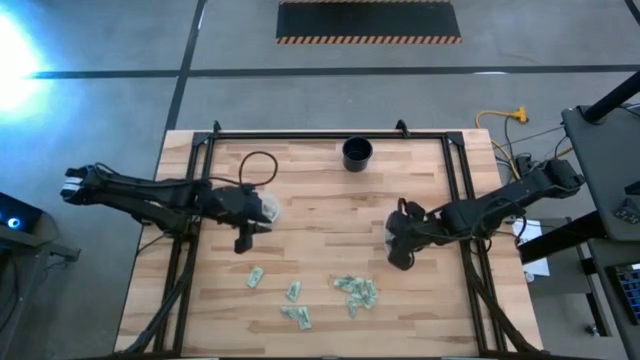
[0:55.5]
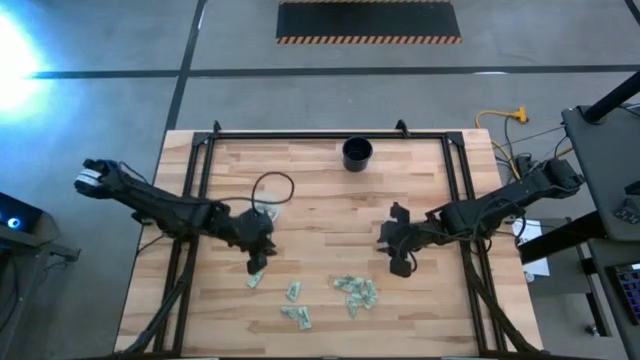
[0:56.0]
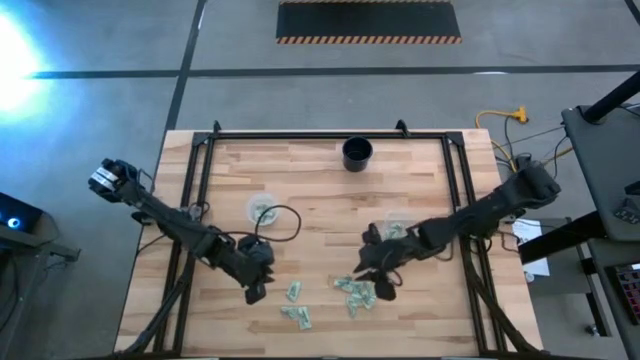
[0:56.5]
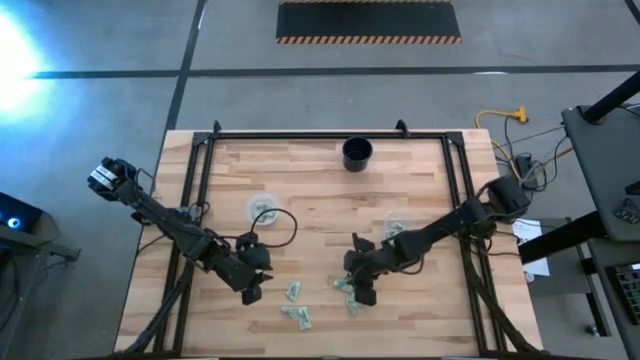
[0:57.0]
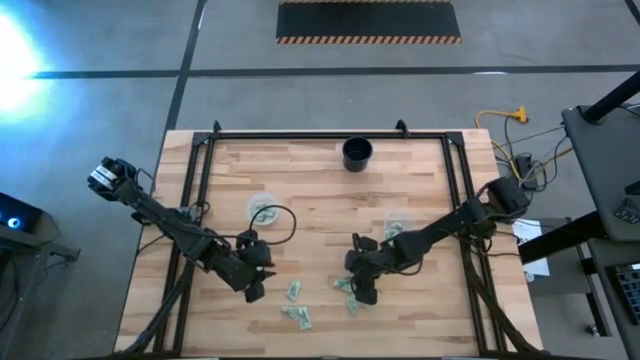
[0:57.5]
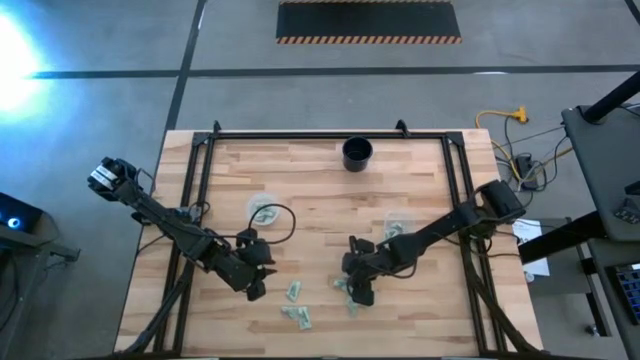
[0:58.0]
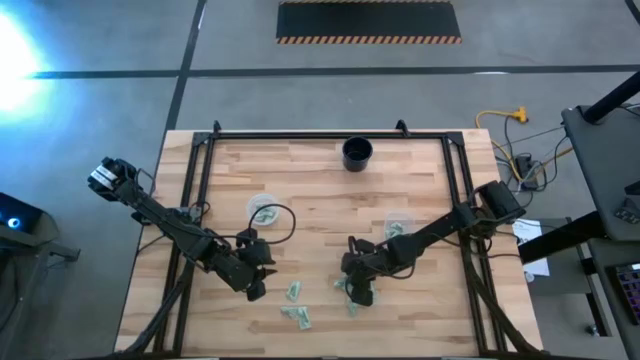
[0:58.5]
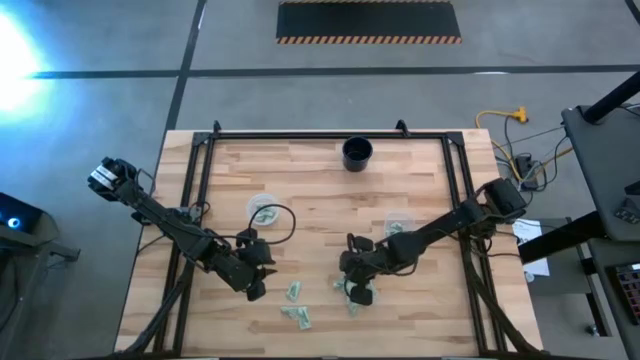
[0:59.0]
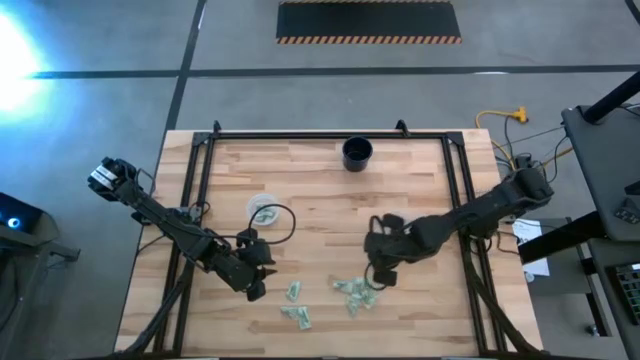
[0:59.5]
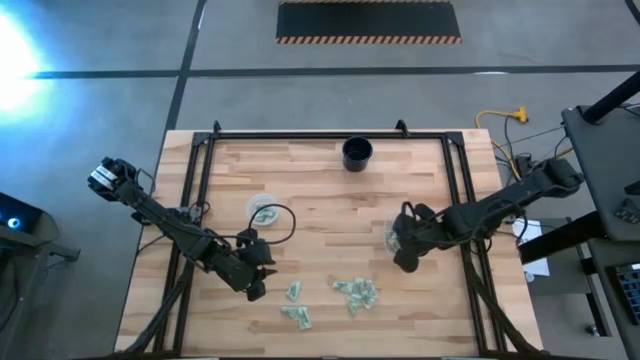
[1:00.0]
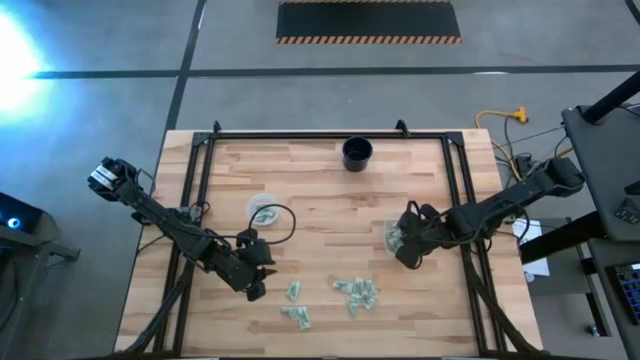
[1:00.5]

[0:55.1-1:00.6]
Task: Pick and place items into bin
Put the white sweetener packet into the right transparent bin

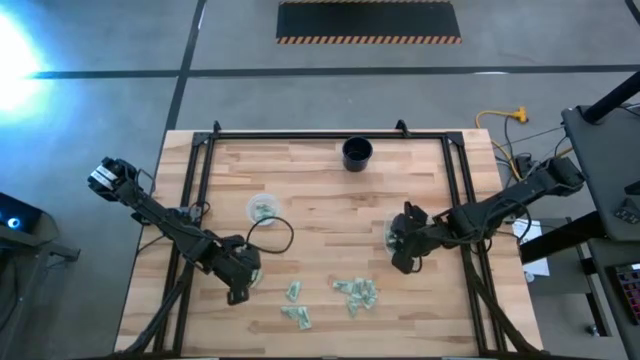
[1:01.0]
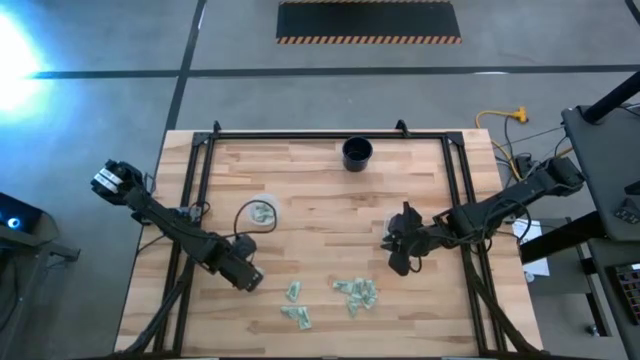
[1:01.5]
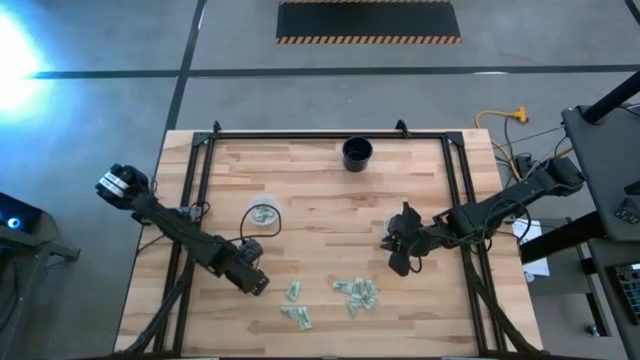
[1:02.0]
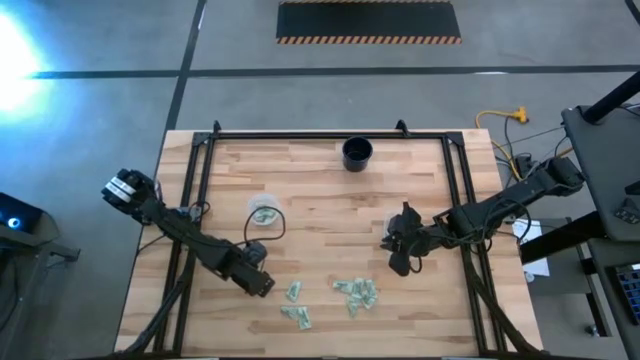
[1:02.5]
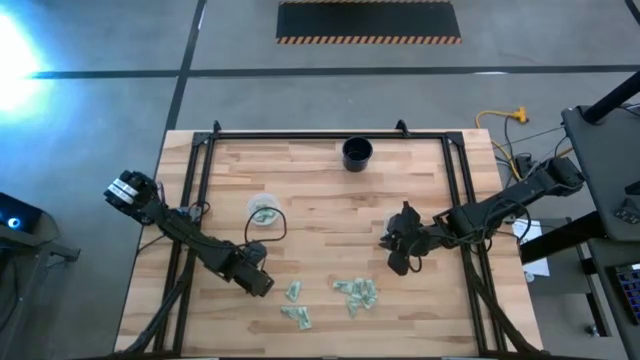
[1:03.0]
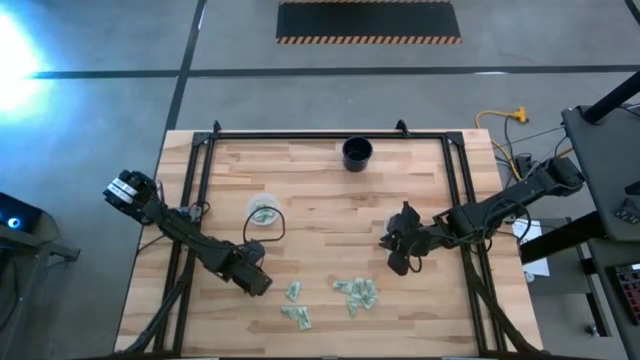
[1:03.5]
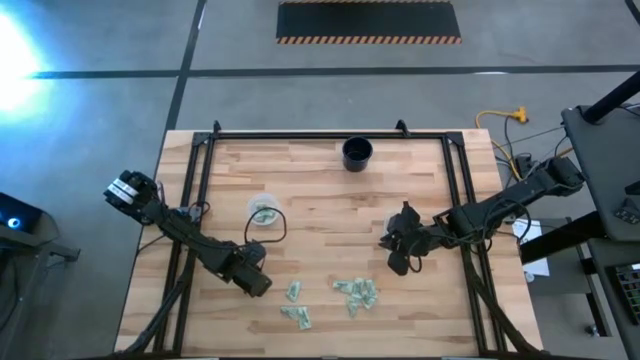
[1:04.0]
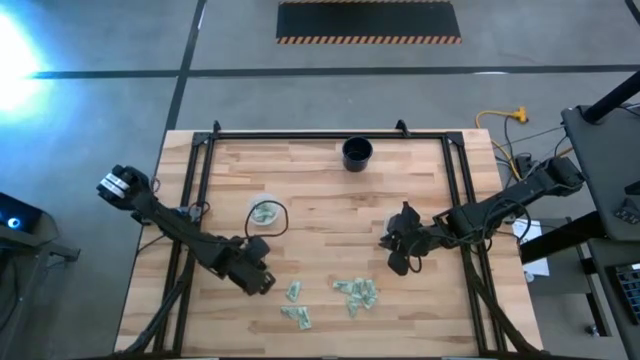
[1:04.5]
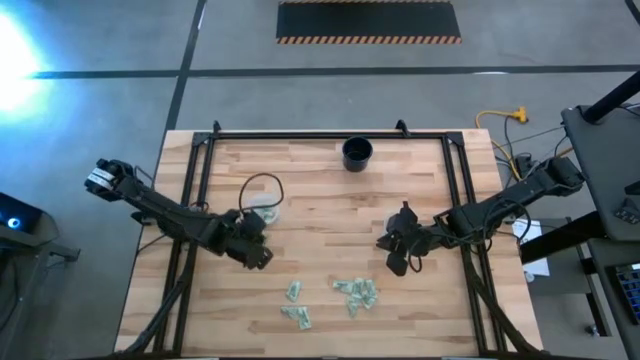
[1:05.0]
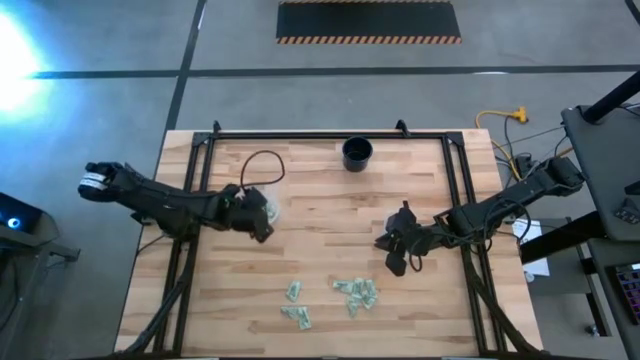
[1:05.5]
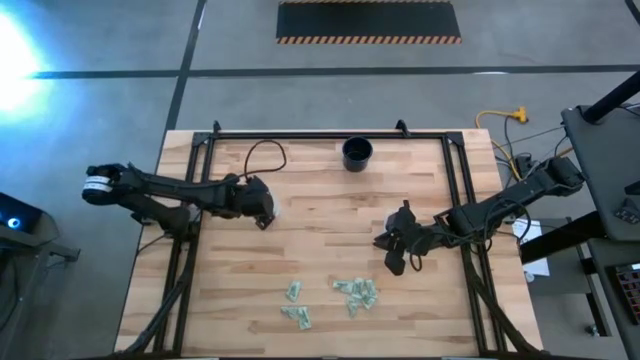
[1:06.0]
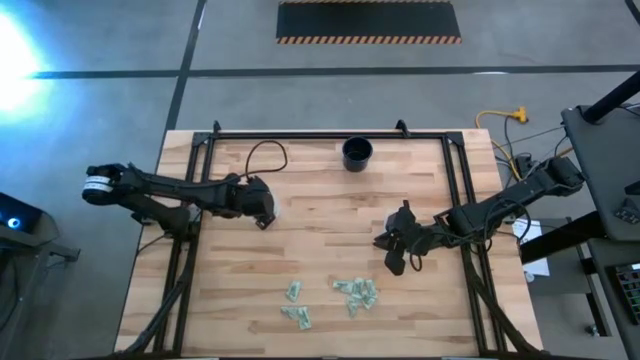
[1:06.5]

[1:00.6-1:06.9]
Put the white sweetener packet into the left transparent bin

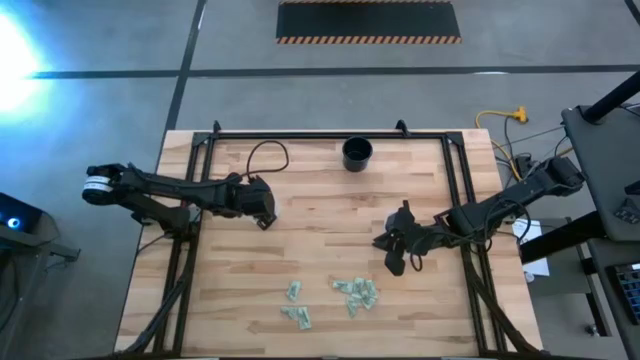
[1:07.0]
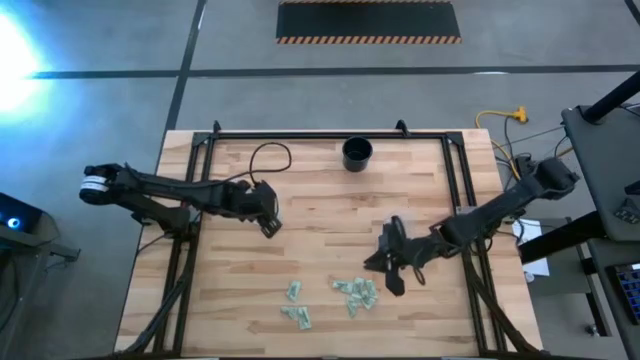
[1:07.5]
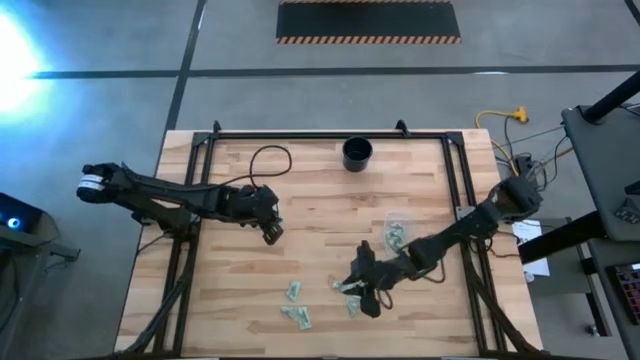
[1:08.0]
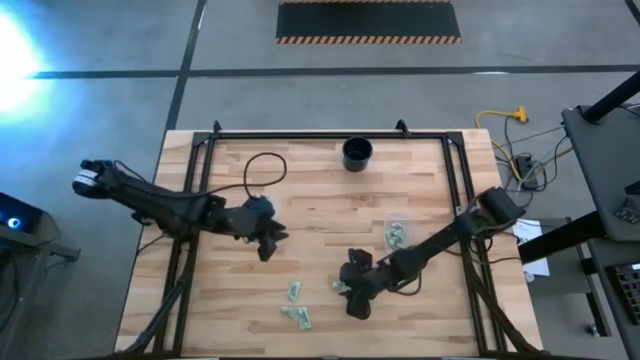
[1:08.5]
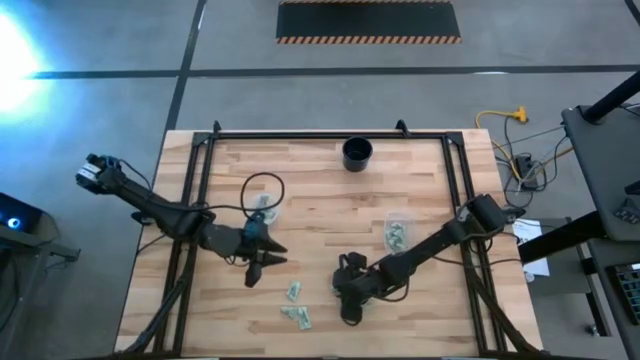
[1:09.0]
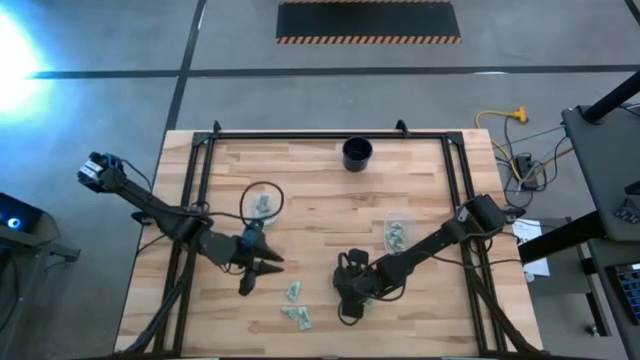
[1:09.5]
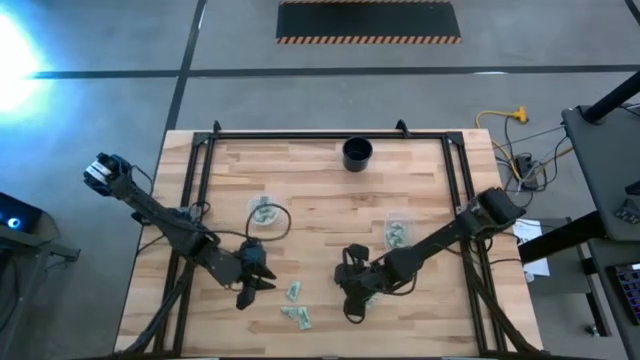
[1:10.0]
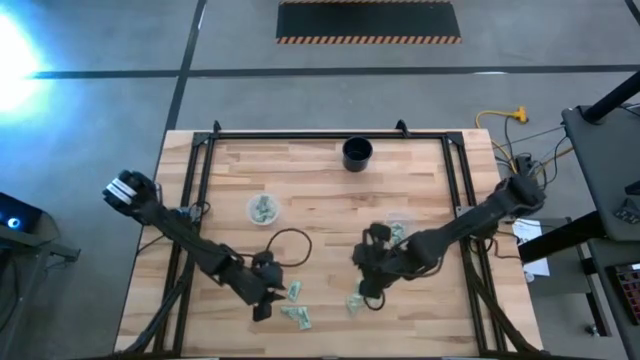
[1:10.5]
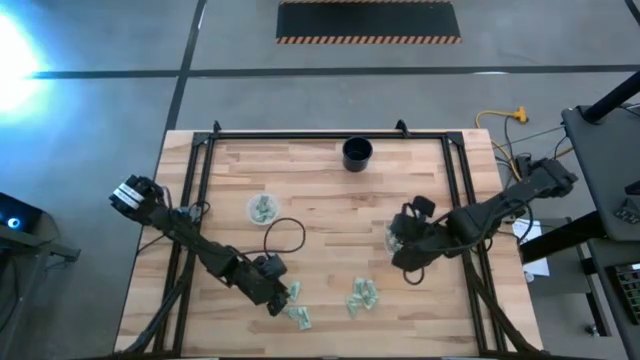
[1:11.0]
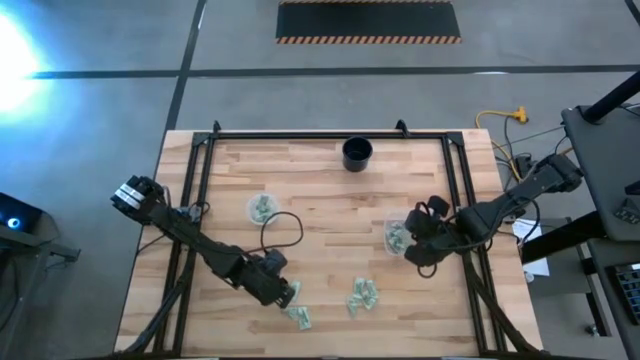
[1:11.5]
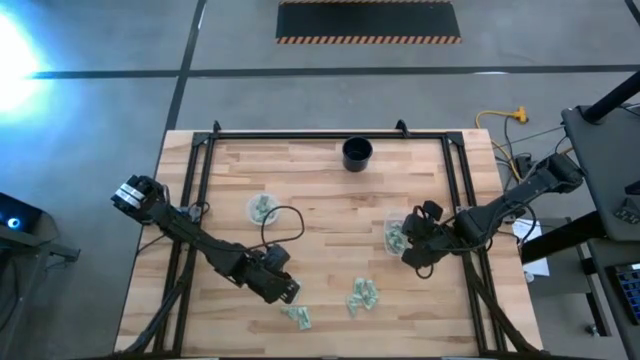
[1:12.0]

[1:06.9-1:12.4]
Put the white sweetener packet into the right transparent bin

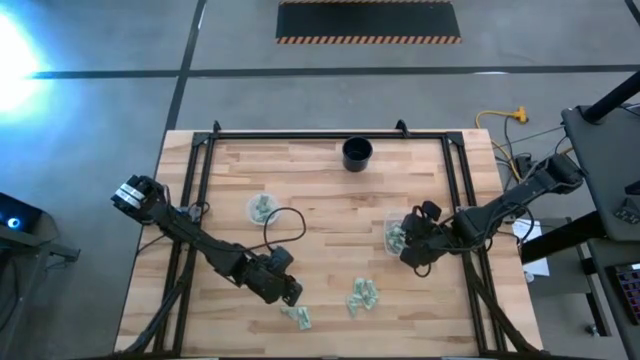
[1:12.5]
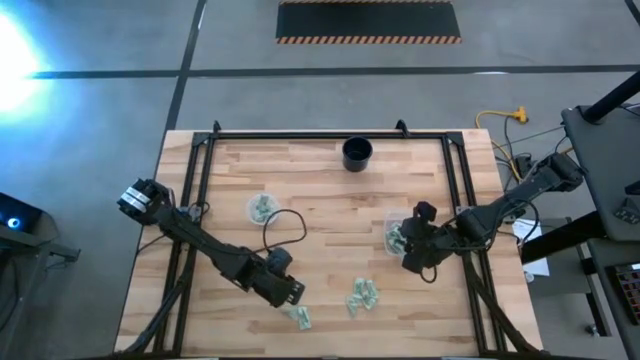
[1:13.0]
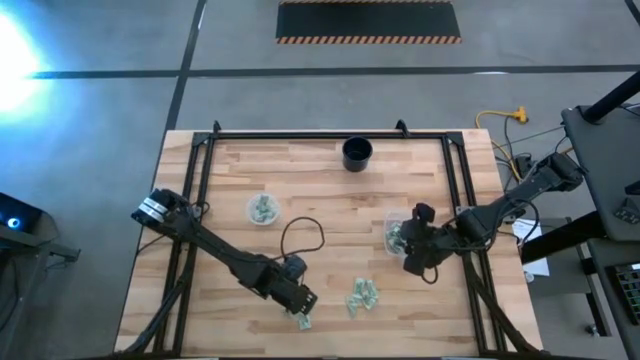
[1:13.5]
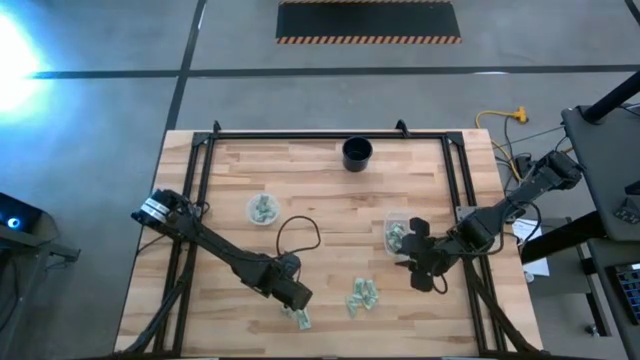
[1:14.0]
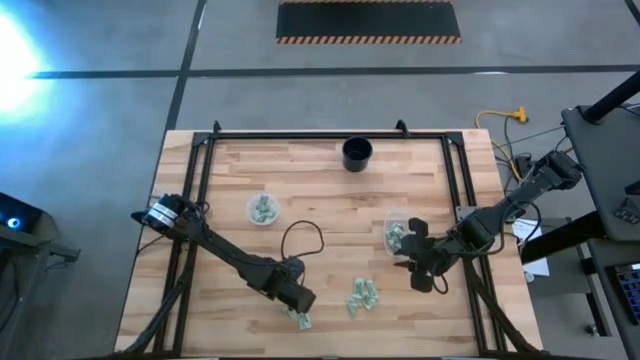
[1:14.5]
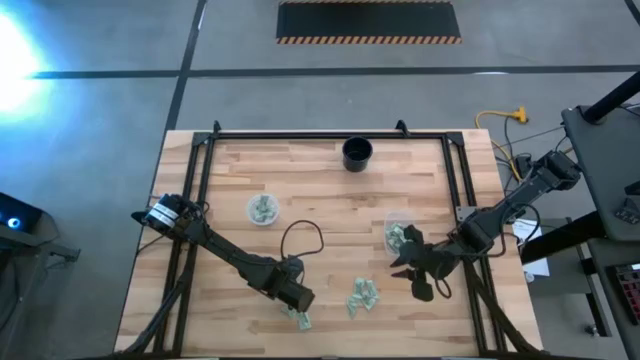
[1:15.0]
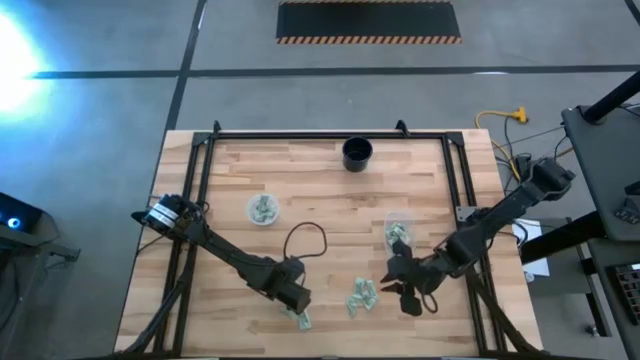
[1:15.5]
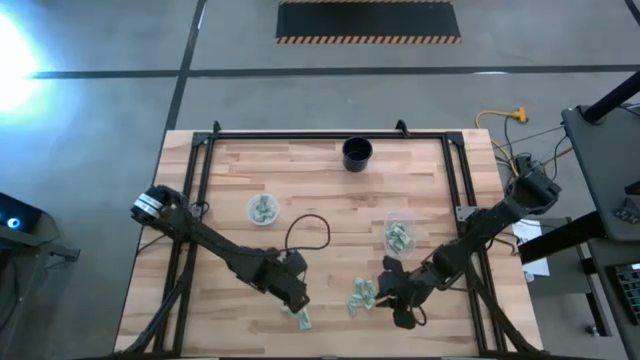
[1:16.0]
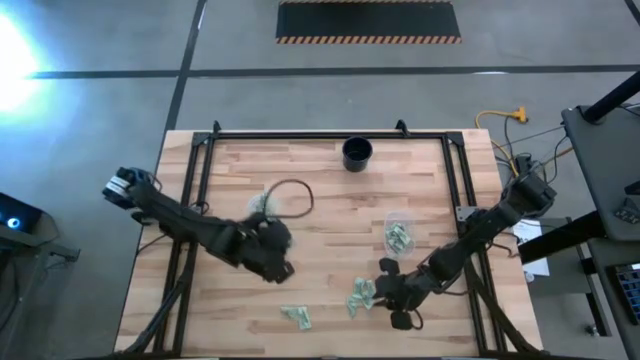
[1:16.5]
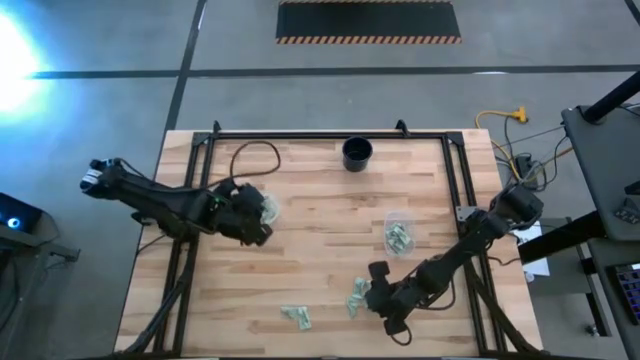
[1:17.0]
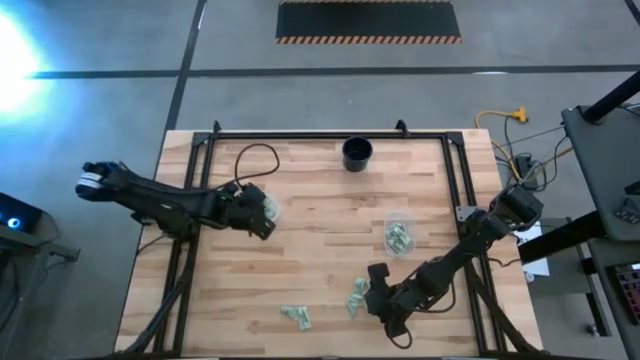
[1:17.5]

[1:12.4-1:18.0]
Put the white sweetener packet into the left transparent bin
